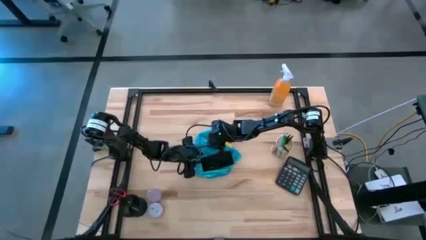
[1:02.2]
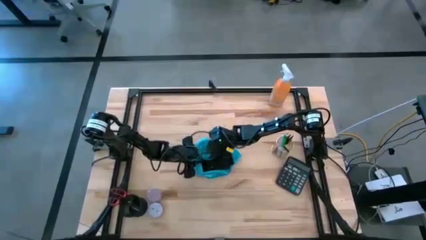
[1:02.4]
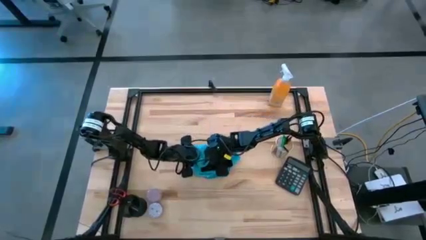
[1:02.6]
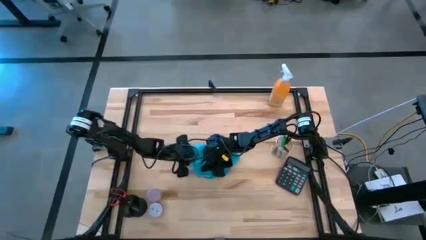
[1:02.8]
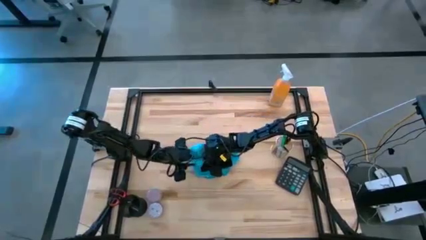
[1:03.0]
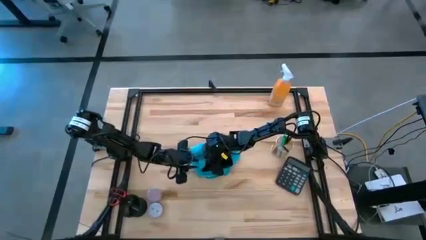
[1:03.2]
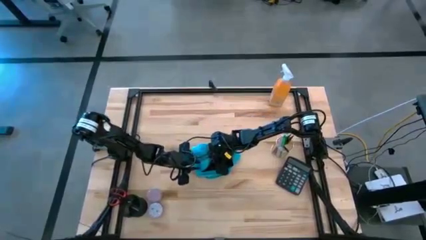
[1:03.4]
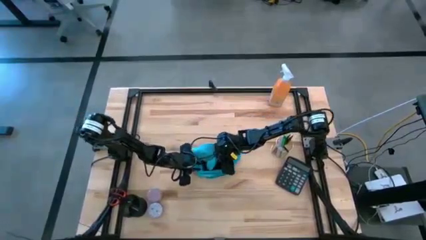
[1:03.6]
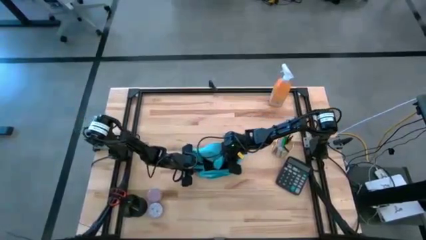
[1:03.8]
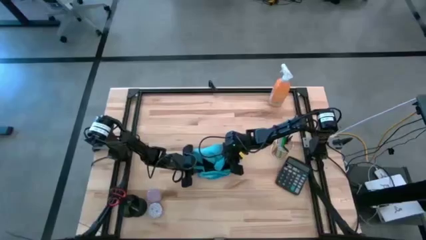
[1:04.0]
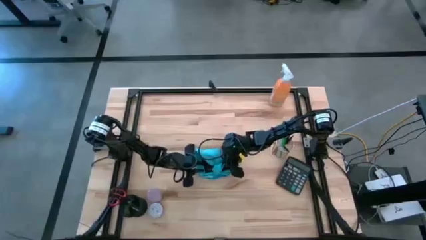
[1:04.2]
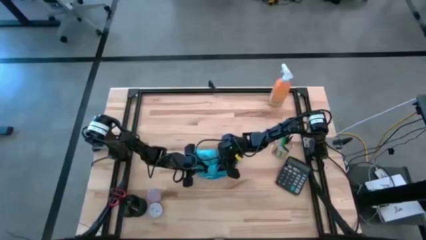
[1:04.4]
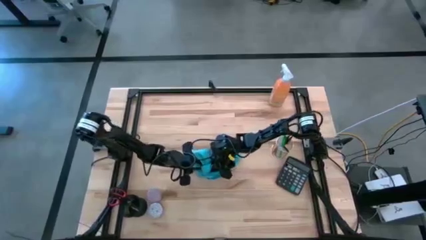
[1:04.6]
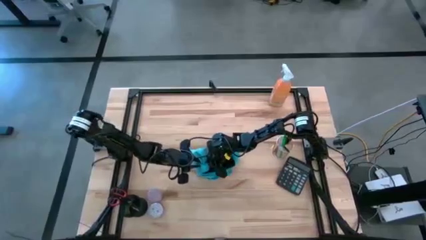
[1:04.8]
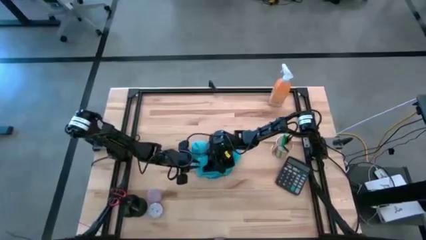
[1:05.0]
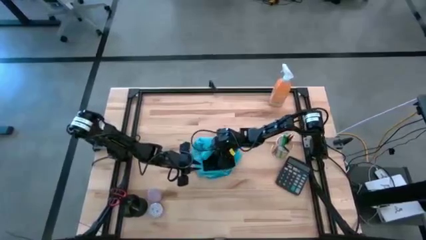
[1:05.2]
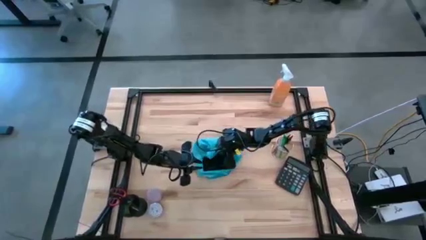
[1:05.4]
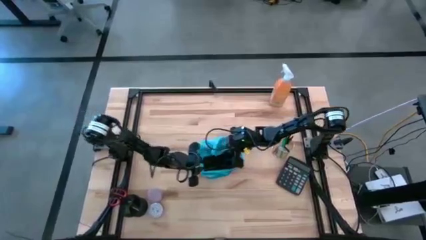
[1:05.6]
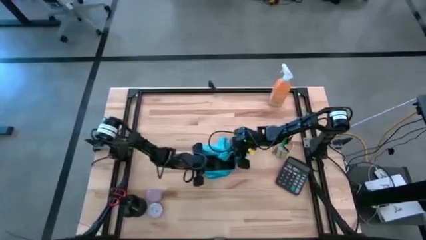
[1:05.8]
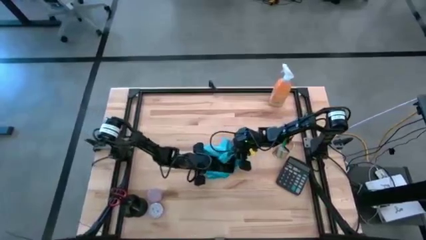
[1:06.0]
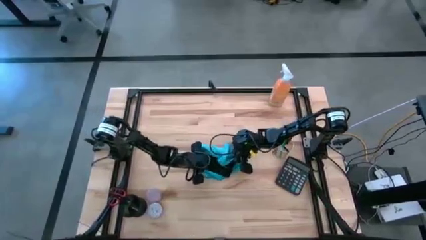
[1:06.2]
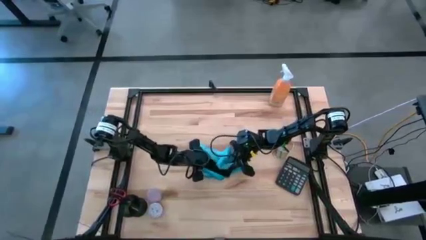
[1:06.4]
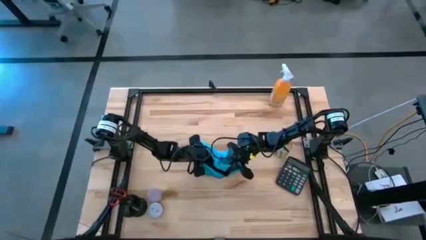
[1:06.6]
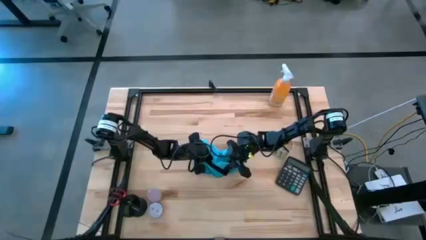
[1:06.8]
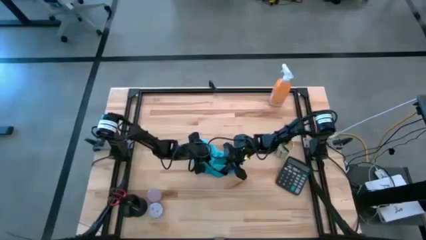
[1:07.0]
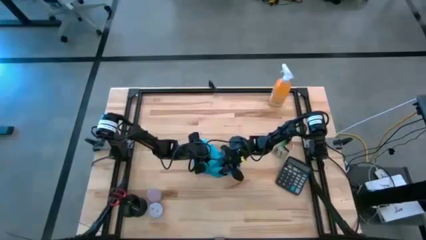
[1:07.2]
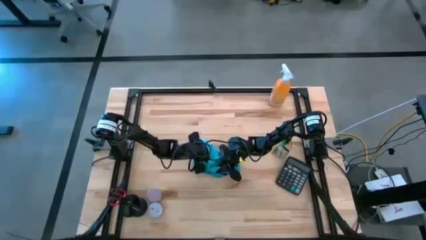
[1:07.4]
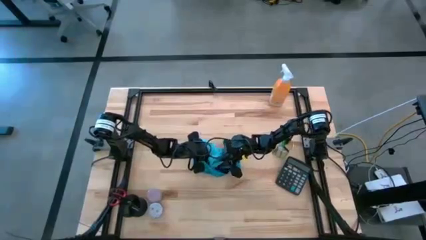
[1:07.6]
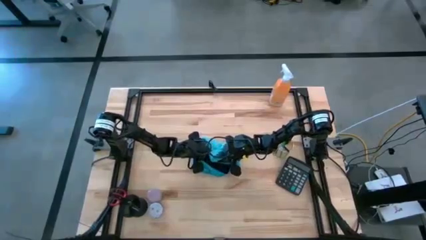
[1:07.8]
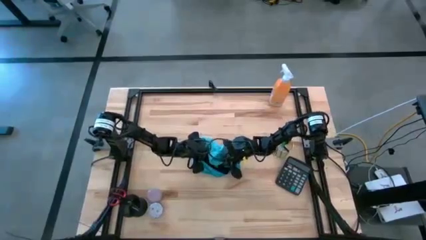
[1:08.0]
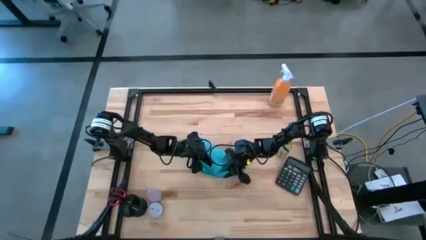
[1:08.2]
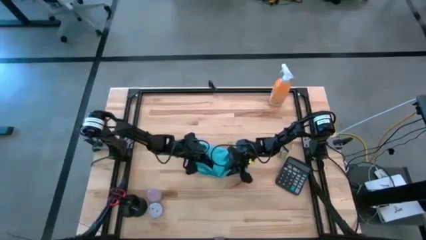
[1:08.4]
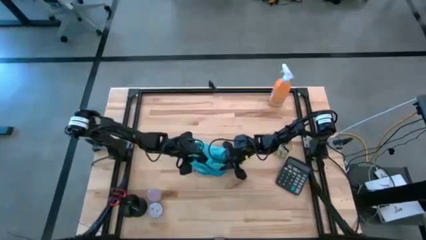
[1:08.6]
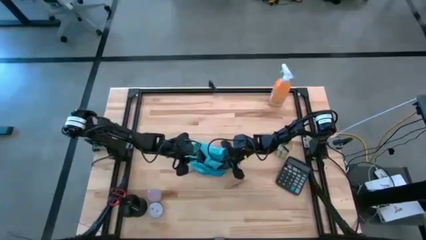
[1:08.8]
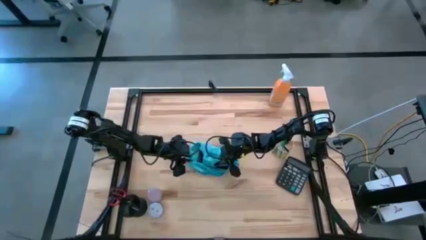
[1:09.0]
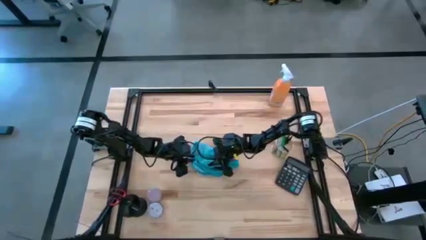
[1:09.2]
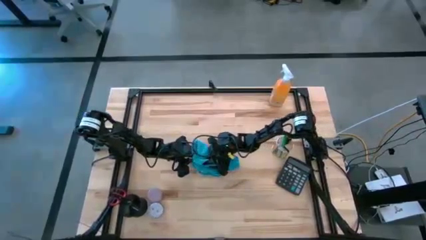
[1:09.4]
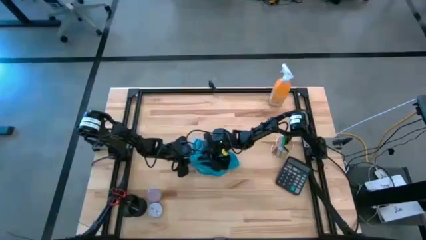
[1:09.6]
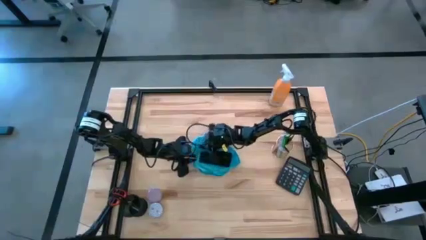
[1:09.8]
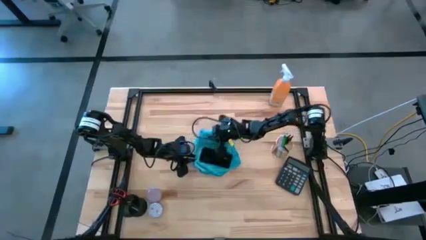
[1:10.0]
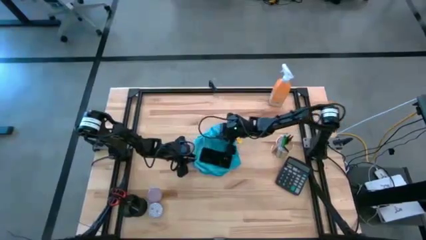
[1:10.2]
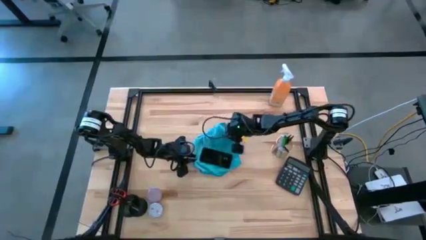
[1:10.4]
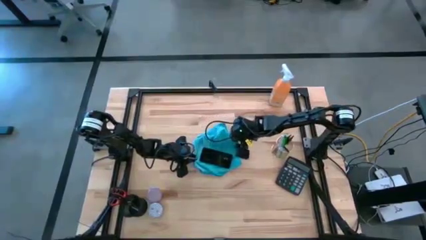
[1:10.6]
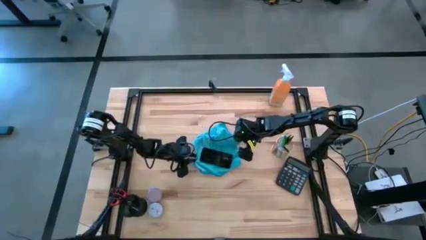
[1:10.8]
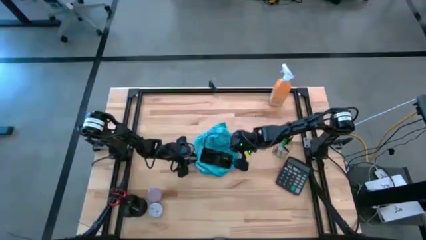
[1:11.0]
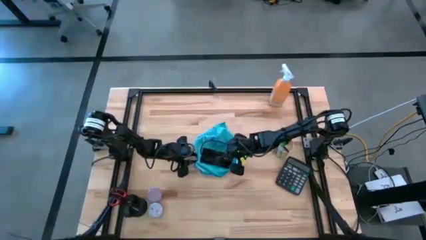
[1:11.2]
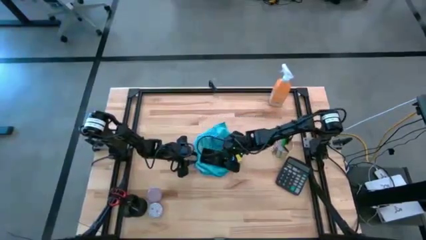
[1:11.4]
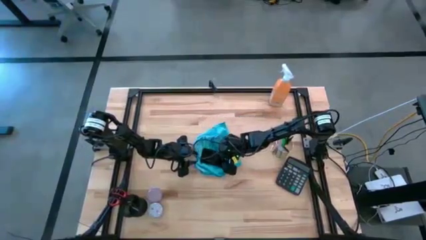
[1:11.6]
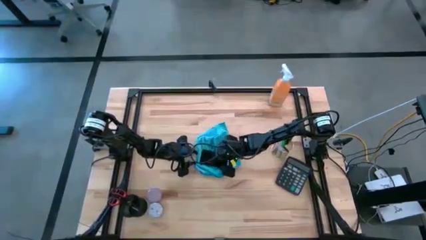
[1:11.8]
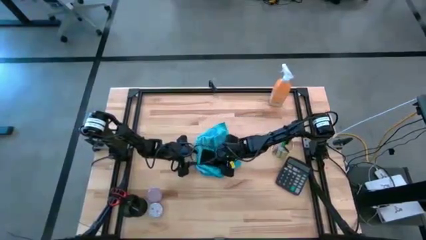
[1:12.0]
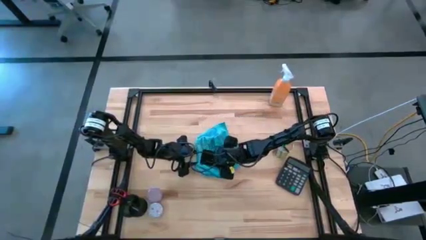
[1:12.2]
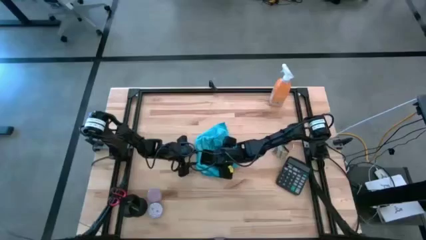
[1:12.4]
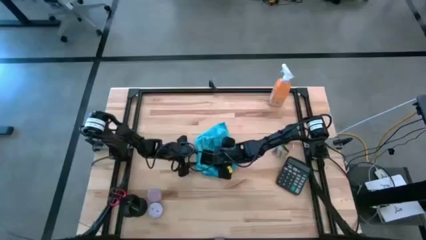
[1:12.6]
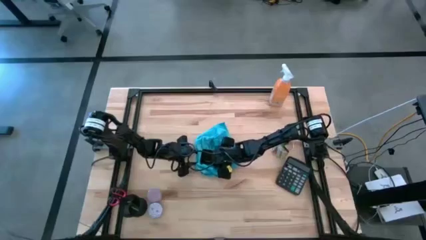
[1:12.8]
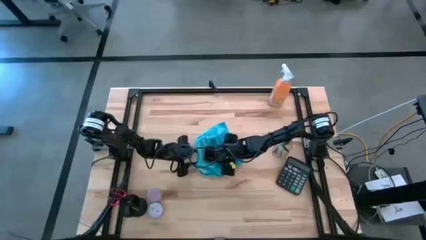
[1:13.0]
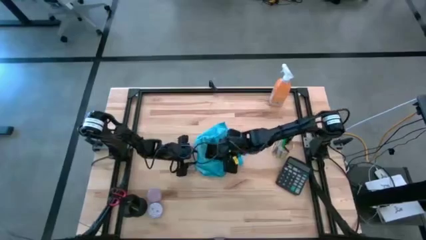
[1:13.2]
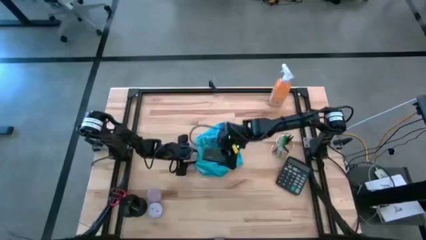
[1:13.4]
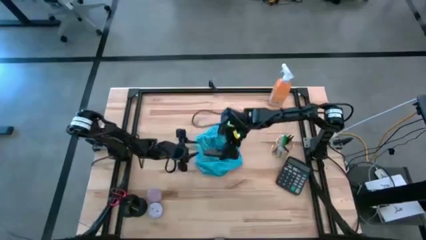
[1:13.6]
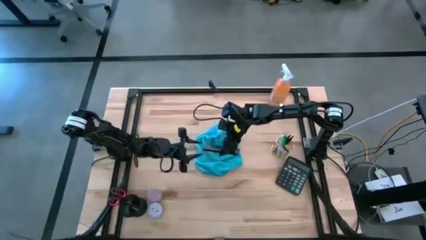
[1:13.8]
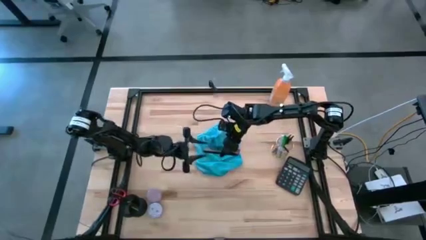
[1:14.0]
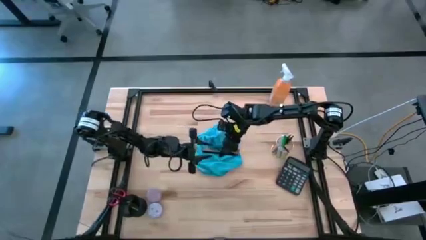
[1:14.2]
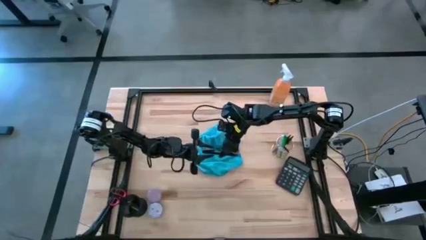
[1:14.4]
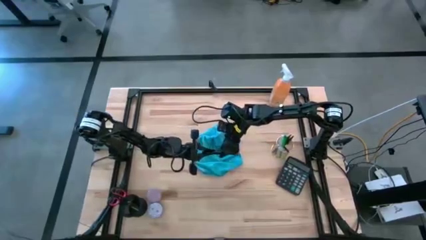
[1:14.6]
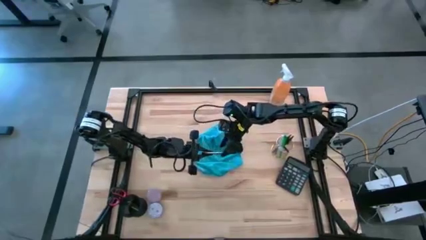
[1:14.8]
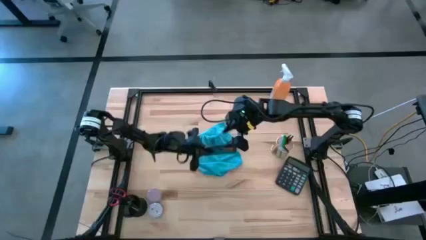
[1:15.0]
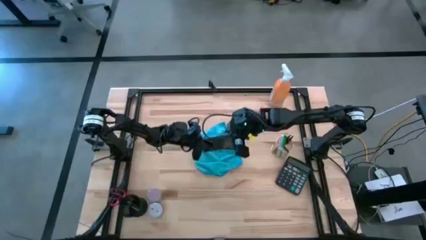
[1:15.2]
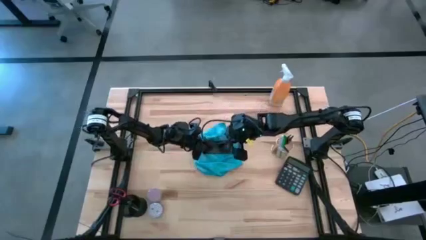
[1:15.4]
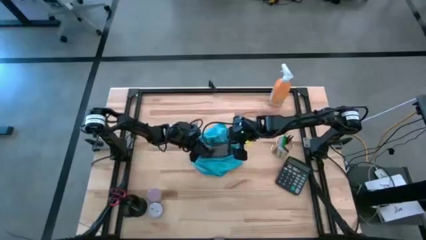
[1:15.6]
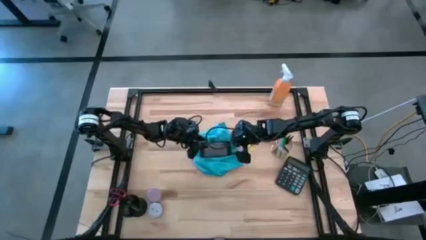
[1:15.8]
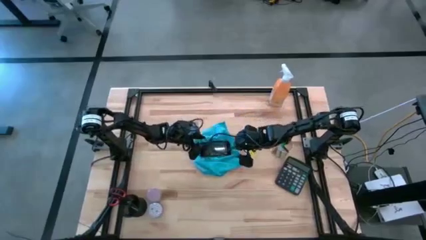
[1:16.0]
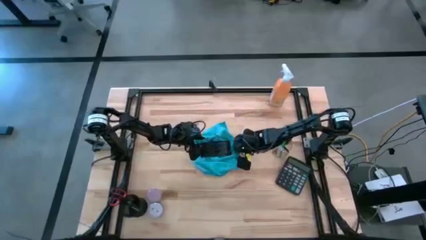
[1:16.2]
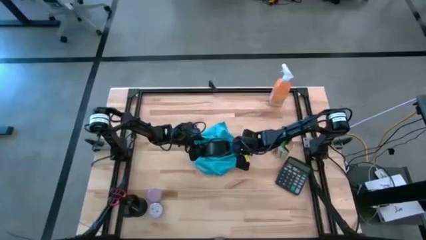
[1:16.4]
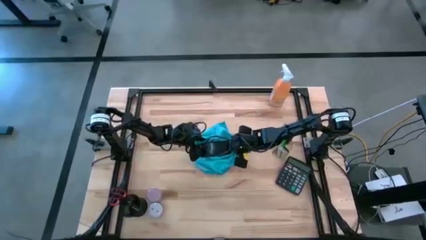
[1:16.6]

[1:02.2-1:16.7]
Task: Apply microfiber cloth
Wipe the front and back of the black cellphone using the blue microfiber cloth
